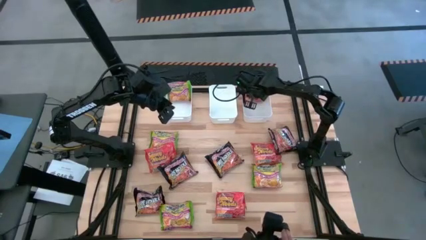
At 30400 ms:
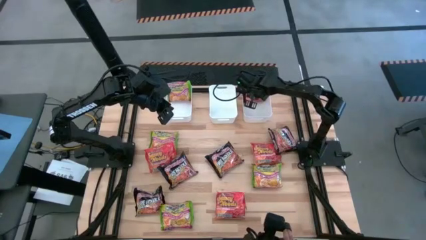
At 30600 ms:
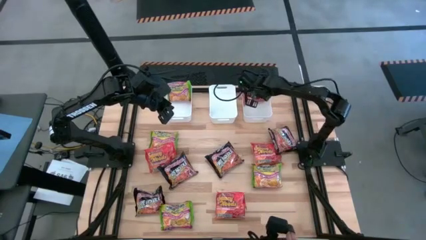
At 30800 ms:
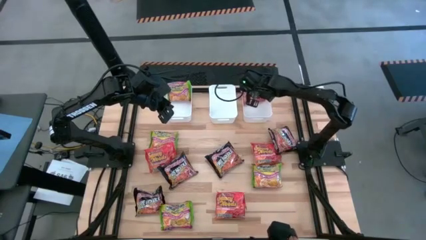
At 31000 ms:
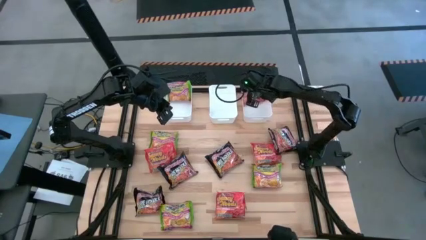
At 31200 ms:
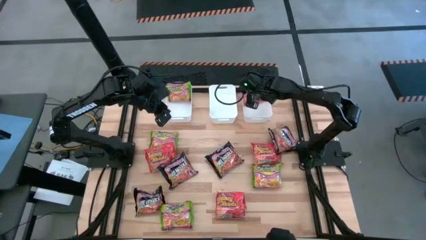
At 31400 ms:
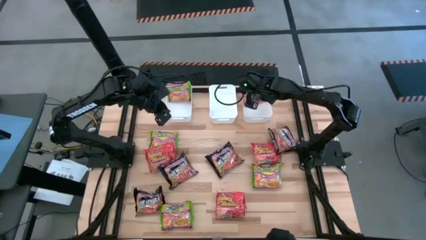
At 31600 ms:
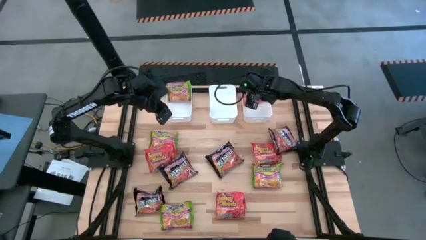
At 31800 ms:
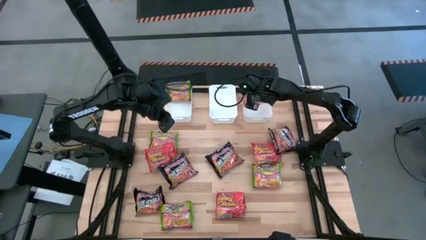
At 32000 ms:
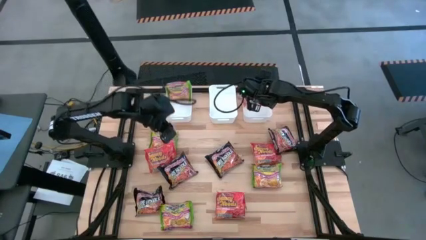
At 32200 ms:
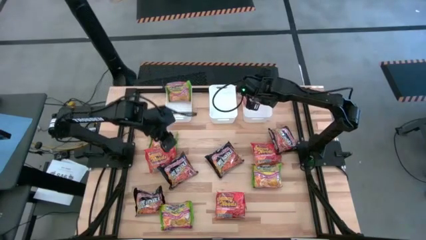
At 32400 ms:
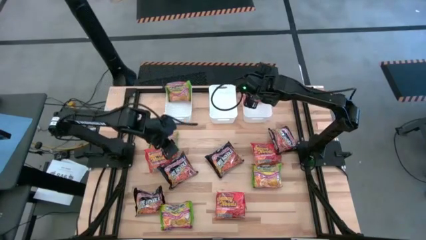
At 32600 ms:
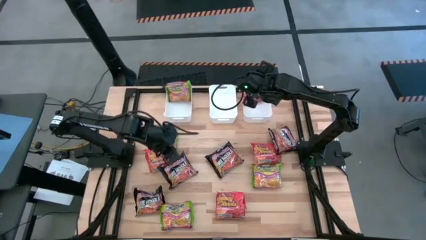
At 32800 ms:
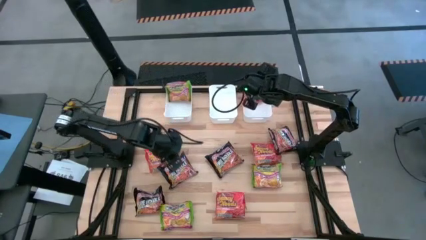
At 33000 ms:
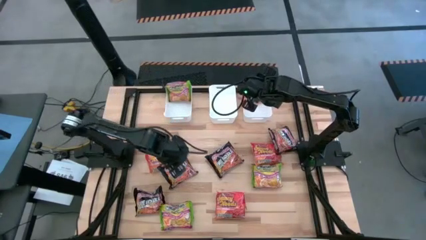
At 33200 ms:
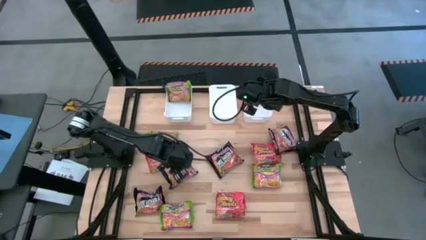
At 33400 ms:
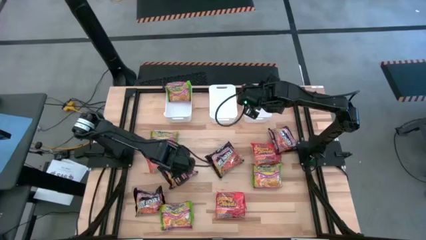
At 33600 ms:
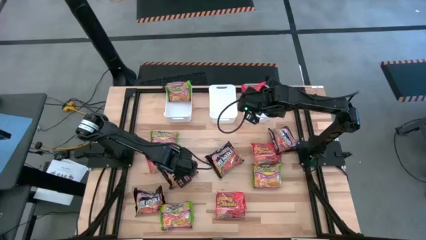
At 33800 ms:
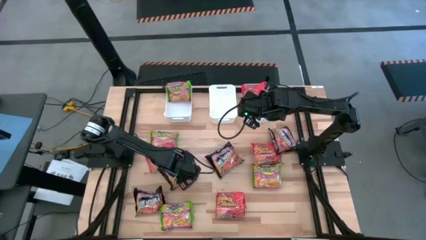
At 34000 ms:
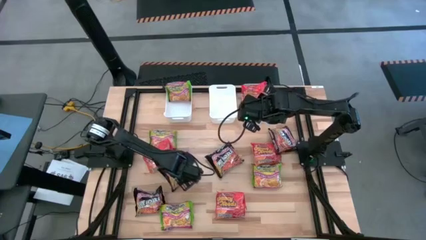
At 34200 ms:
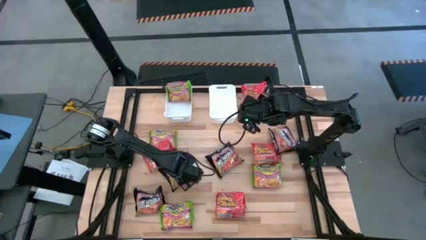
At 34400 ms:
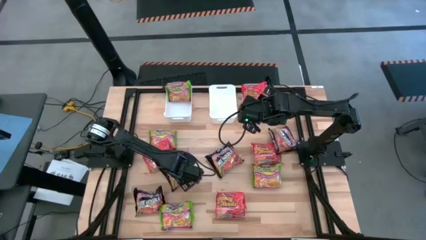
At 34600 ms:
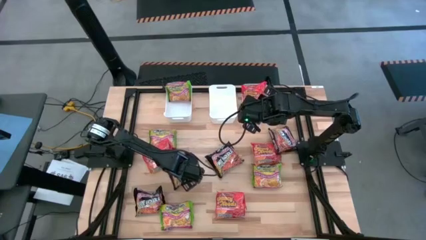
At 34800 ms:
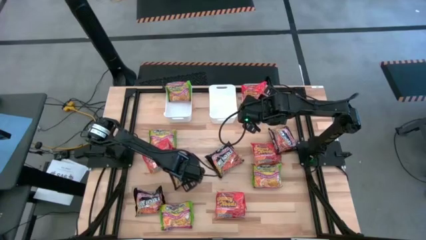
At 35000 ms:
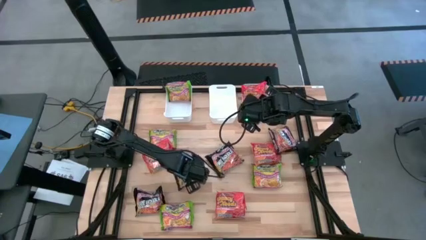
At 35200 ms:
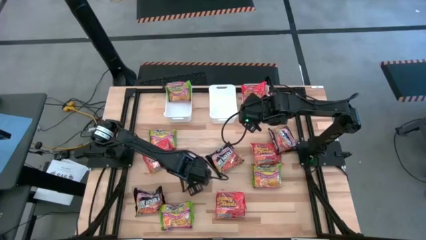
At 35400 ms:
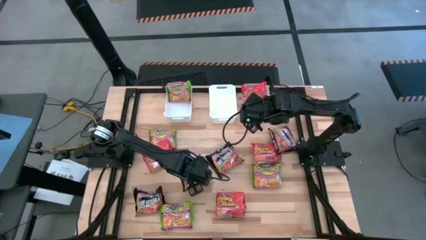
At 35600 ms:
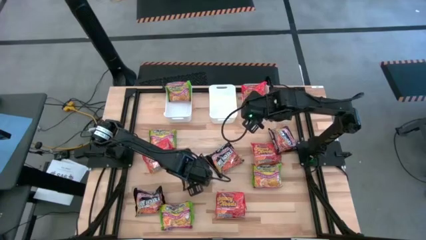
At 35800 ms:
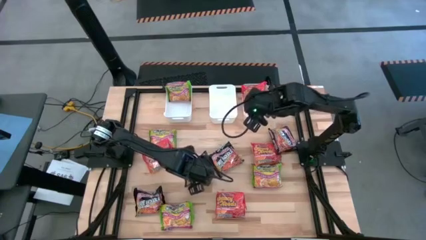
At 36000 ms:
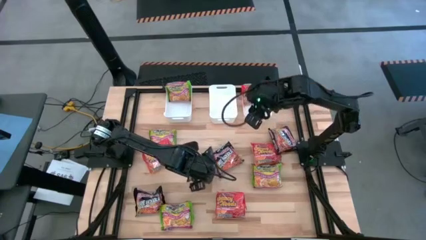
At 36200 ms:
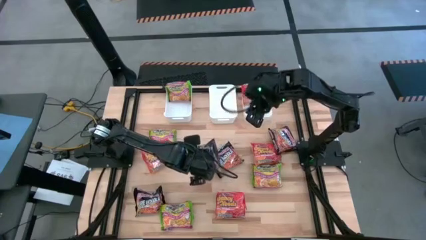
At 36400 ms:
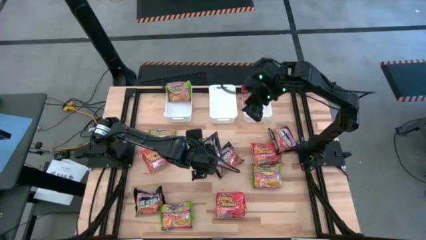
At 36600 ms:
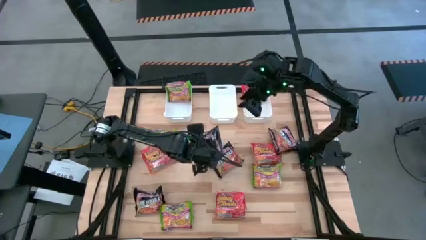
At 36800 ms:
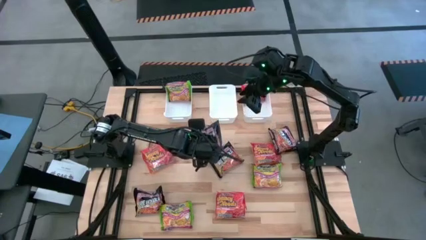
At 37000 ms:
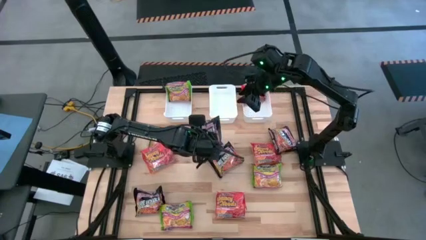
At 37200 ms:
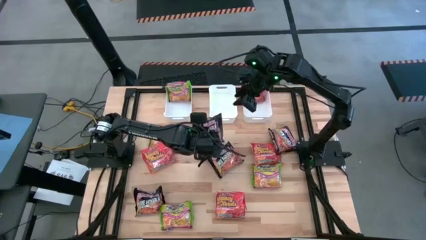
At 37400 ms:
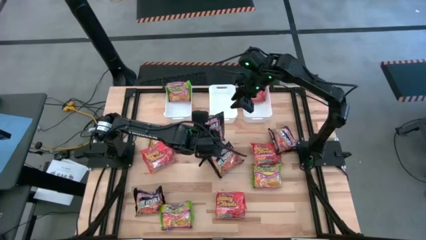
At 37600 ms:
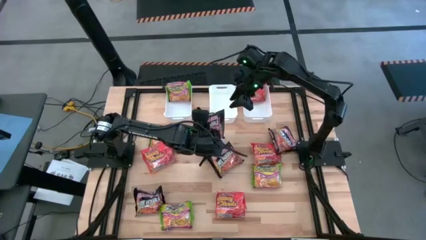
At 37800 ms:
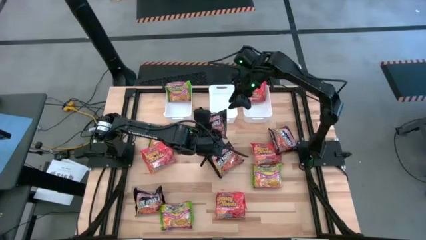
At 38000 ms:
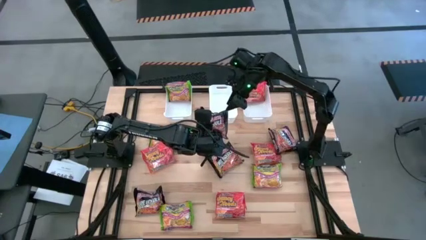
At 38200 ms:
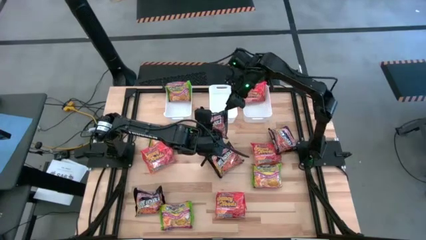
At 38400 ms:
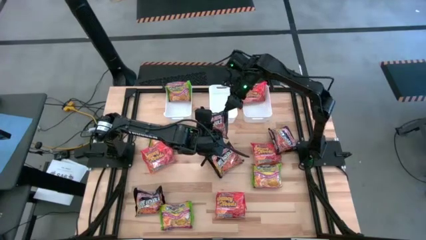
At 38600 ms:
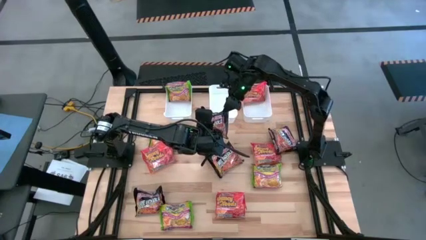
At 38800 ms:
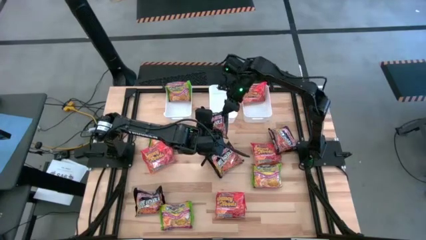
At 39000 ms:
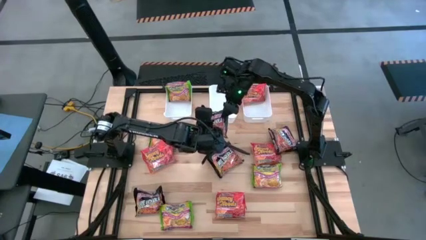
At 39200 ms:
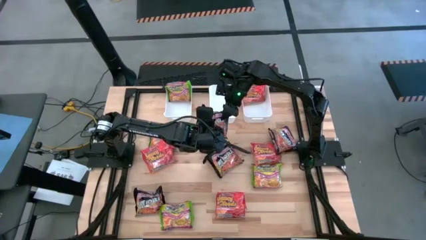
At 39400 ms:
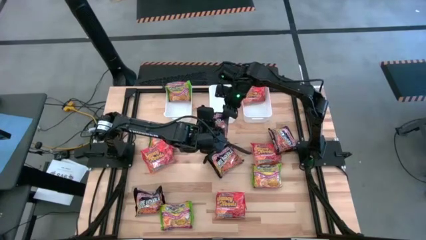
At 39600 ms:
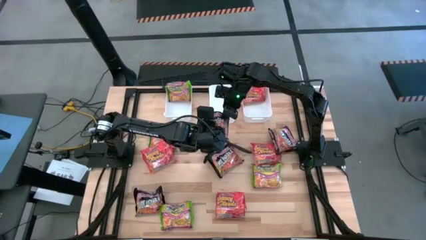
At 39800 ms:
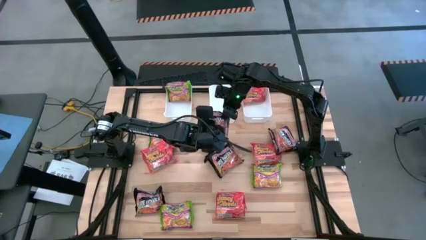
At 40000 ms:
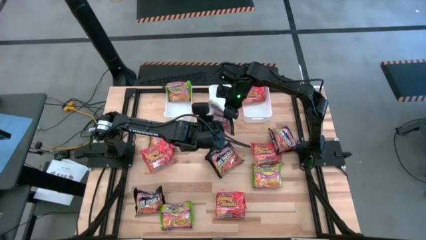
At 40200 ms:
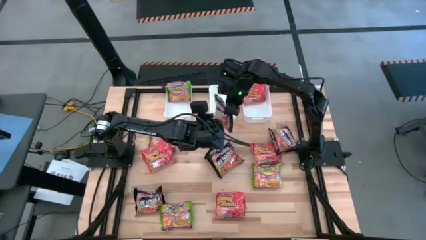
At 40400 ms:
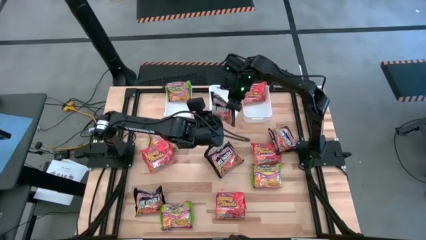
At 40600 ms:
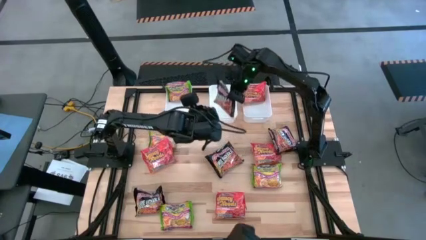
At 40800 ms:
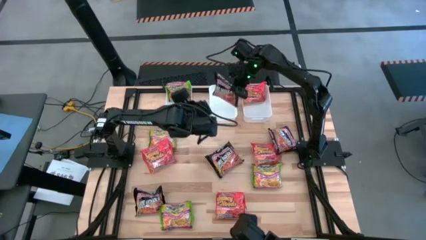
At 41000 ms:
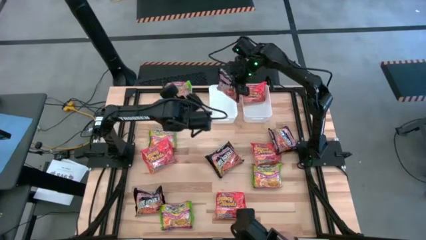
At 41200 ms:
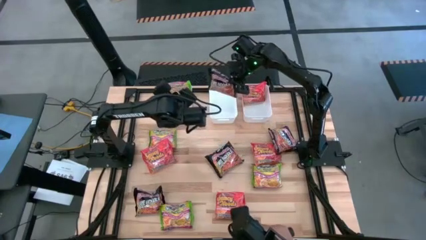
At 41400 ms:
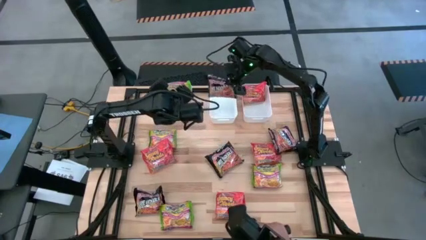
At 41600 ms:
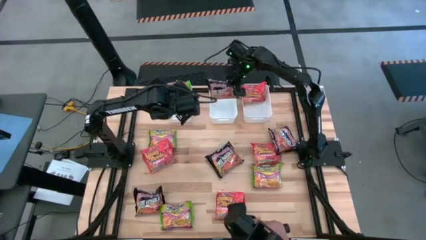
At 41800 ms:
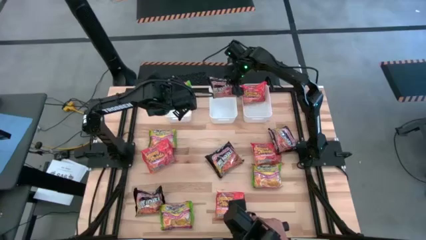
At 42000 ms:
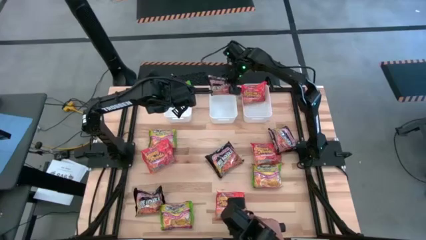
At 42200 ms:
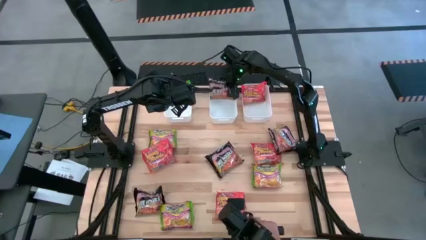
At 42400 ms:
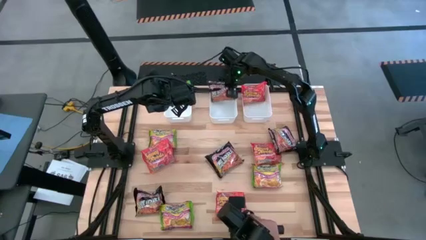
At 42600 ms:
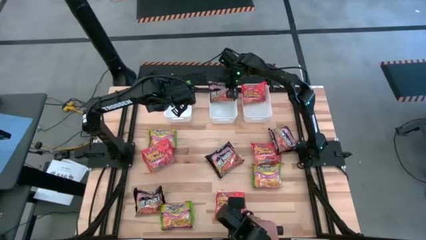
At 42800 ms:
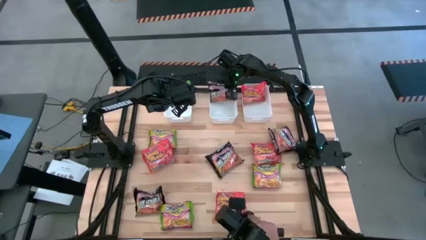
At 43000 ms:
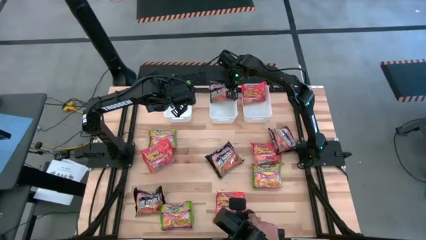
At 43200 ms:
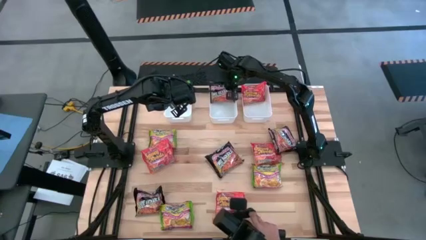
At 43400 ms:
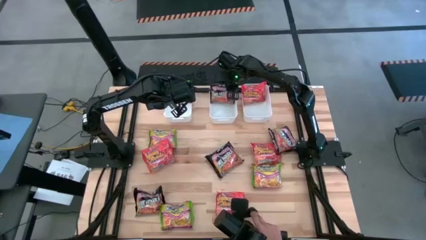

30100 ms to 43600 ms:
Task: Sort Maruchan noodles
Put the black noodle pack into the middle white bin
